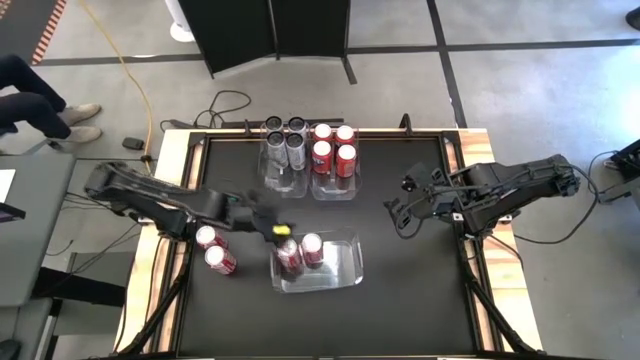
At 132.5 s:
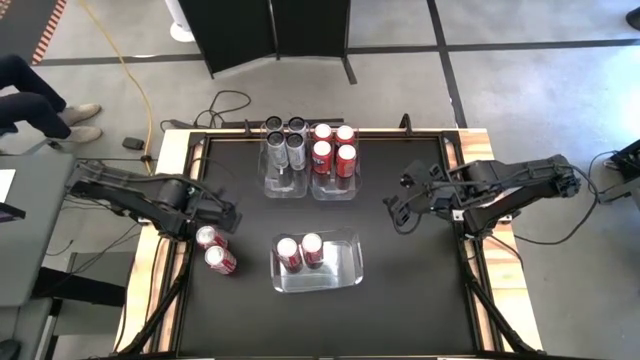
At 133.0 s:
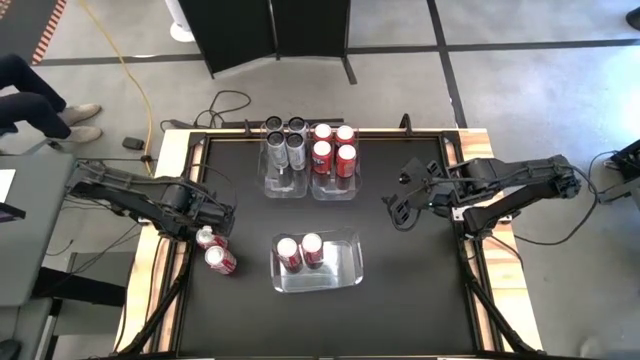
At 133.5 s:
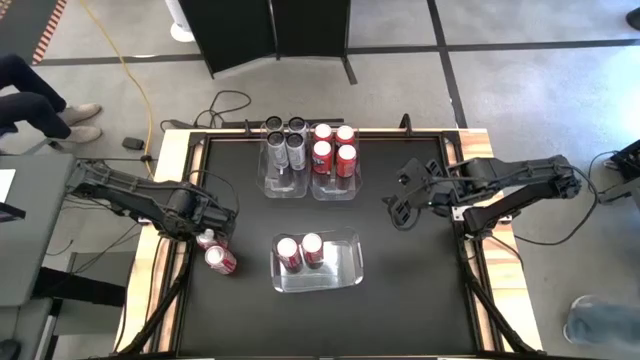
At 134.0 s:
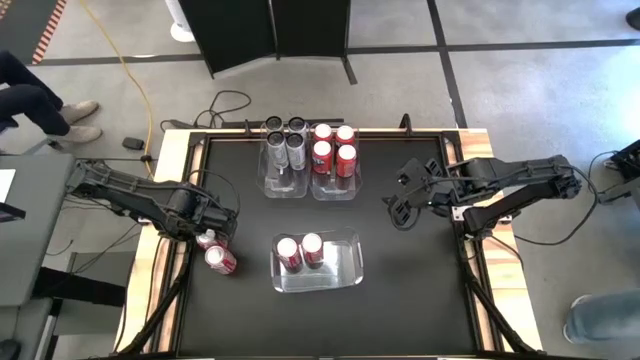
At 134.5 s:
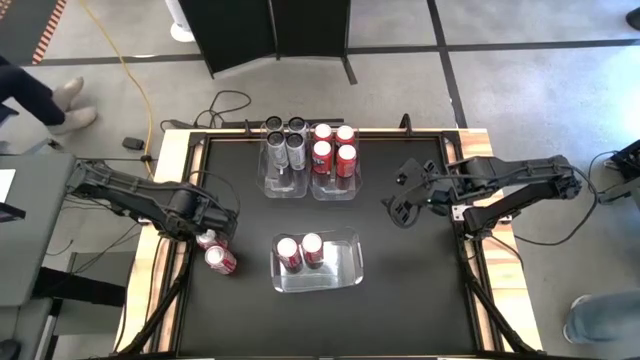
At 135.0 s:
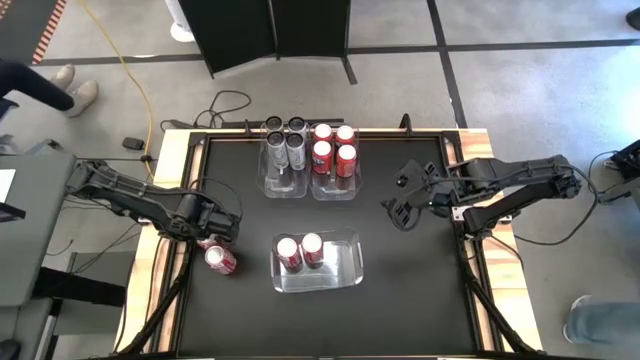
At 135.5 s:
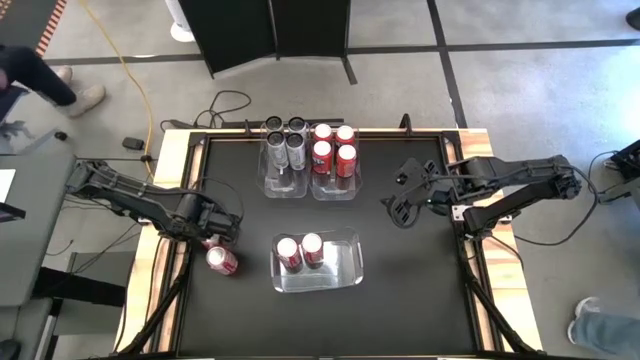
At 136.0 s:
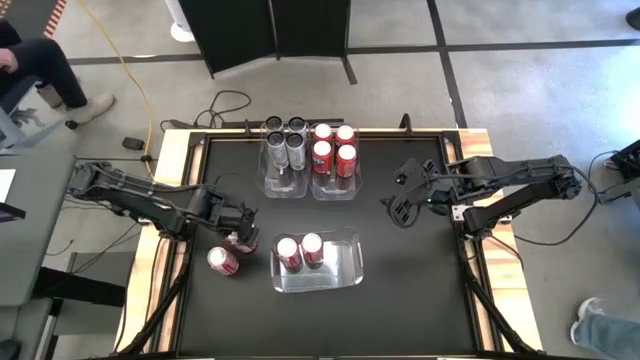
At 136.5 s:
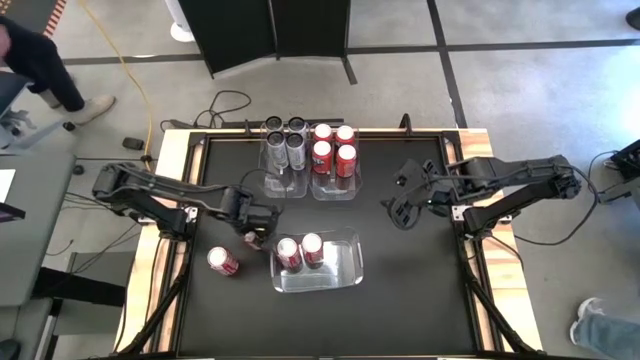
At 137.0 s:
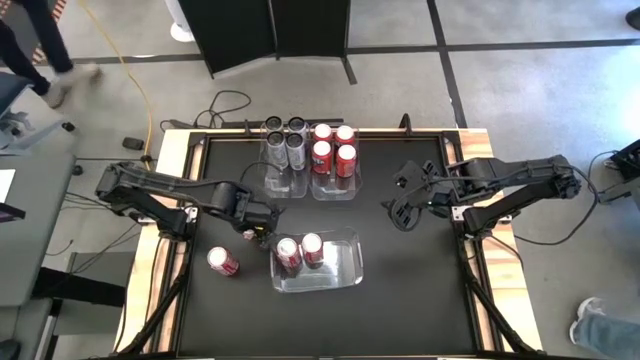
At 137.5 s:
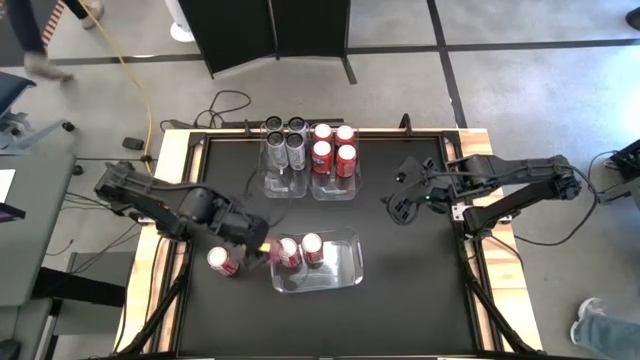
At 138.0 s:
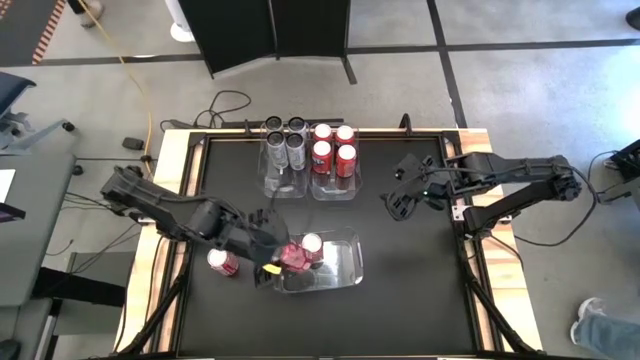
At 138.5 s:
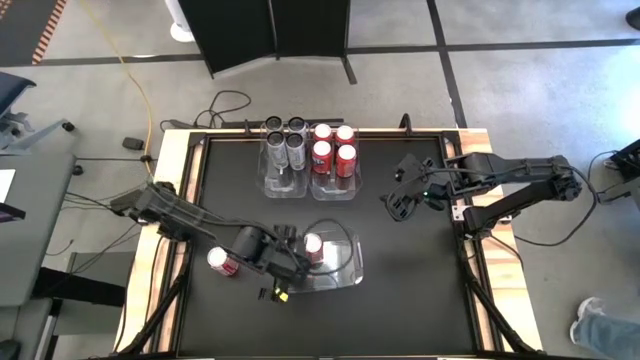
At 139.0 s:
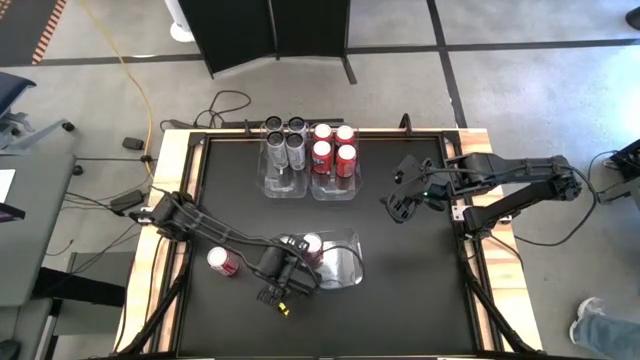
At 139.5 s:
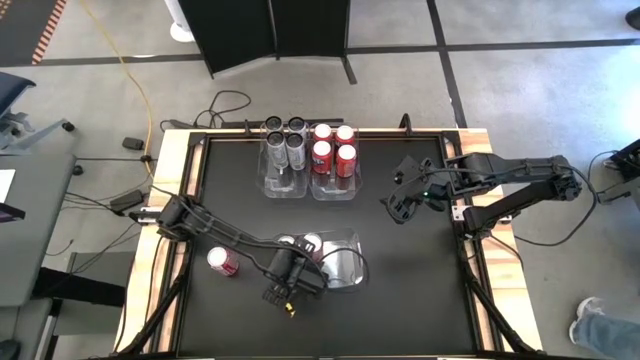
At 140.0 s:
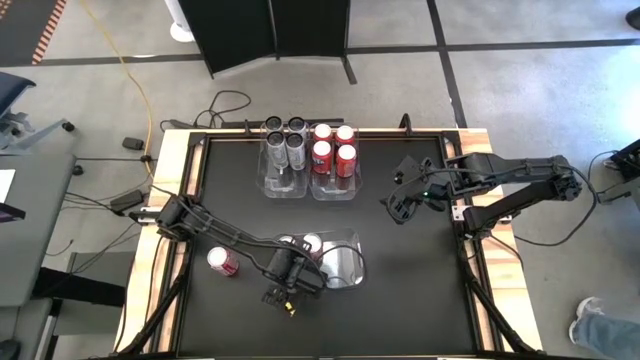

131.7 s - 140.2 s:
Task: Sort soda cans
Put the top red-white soda can into the bottom transparent bin

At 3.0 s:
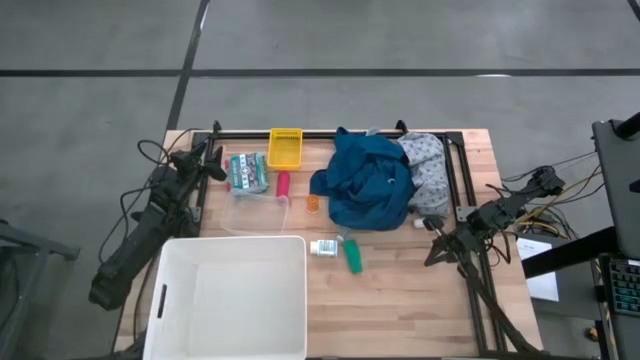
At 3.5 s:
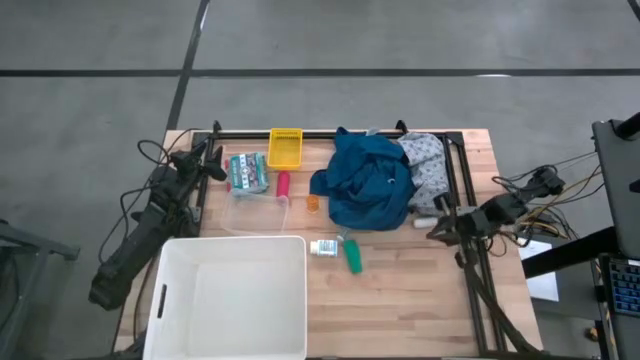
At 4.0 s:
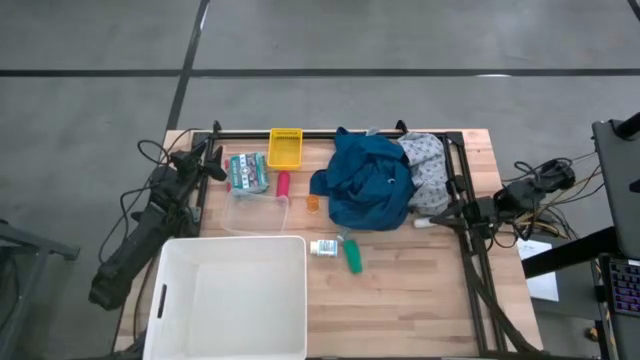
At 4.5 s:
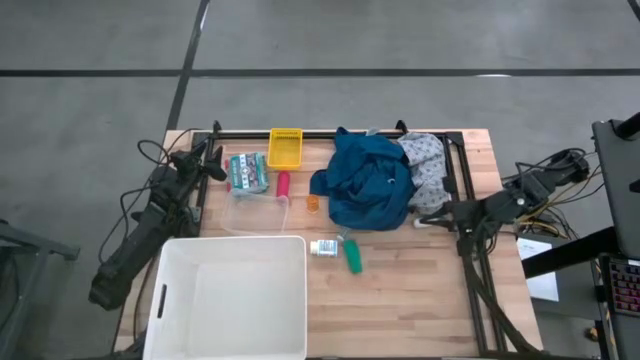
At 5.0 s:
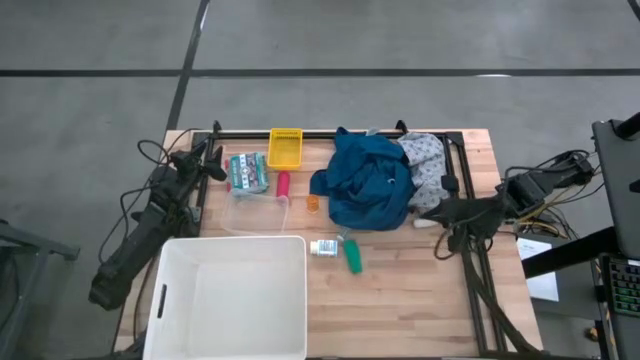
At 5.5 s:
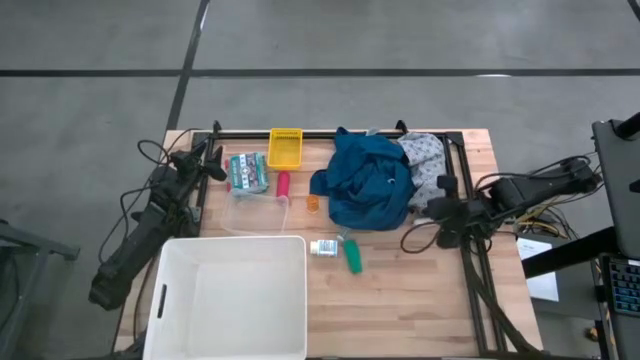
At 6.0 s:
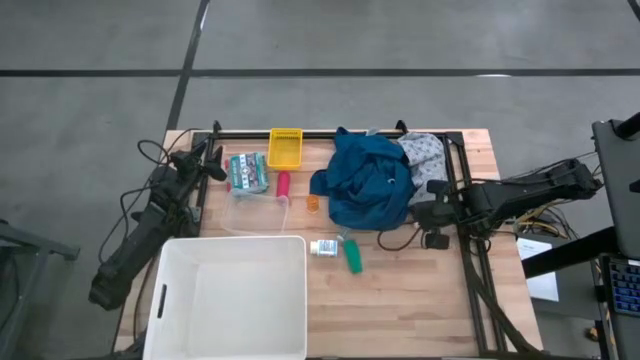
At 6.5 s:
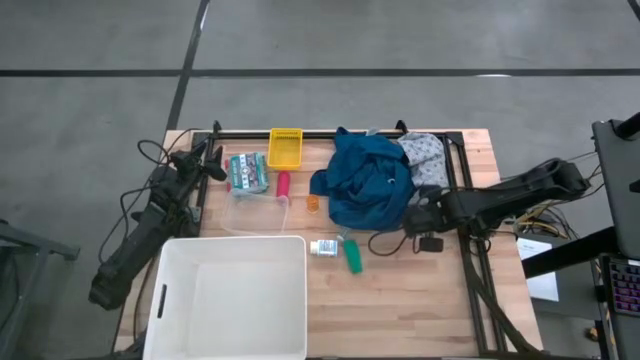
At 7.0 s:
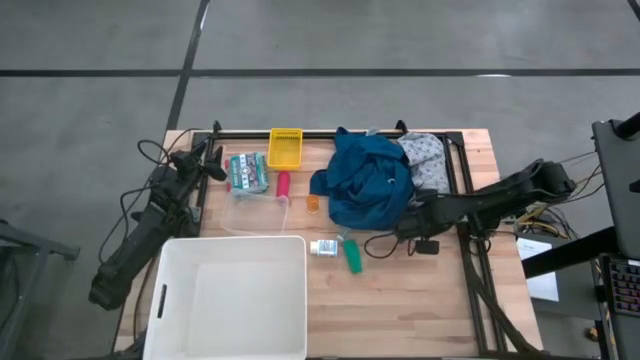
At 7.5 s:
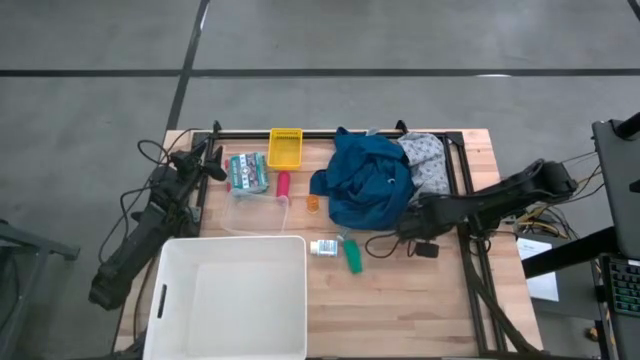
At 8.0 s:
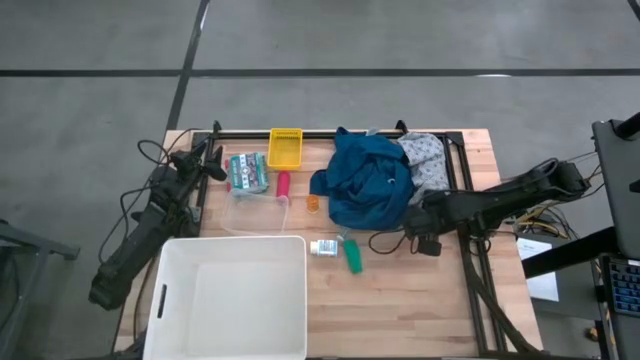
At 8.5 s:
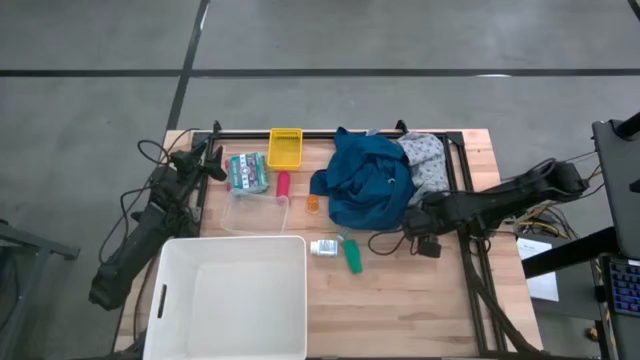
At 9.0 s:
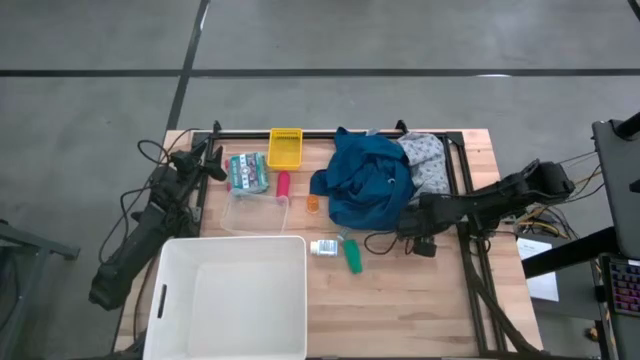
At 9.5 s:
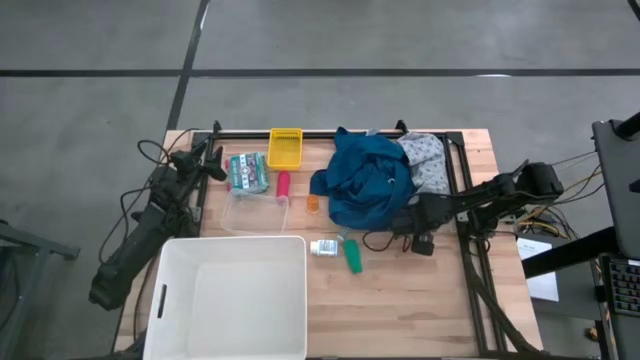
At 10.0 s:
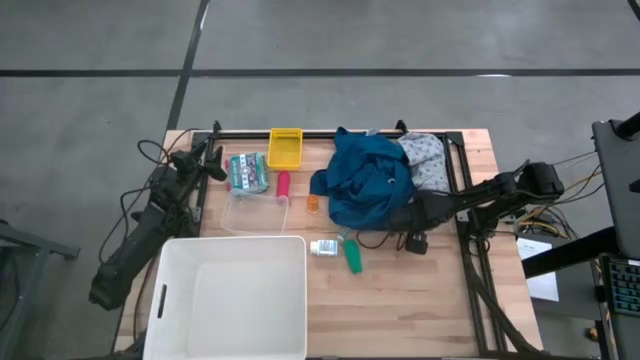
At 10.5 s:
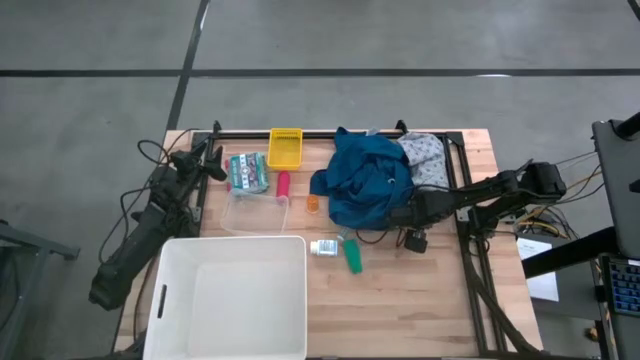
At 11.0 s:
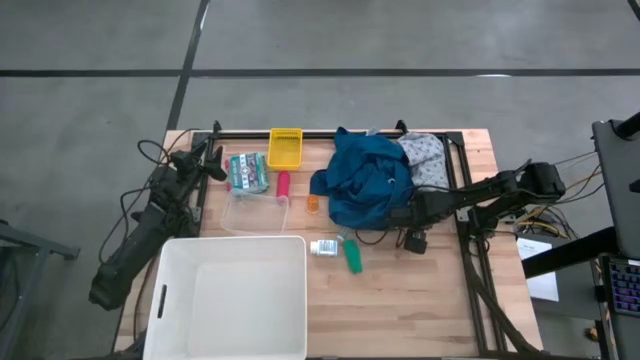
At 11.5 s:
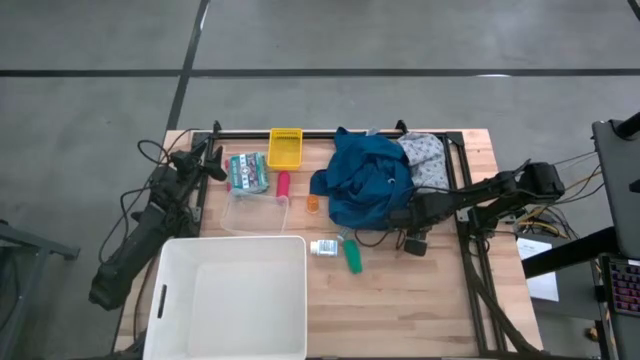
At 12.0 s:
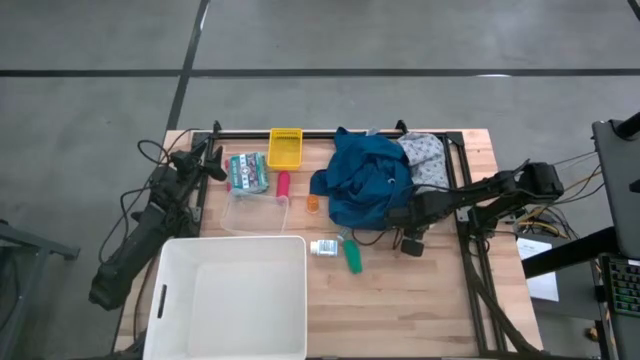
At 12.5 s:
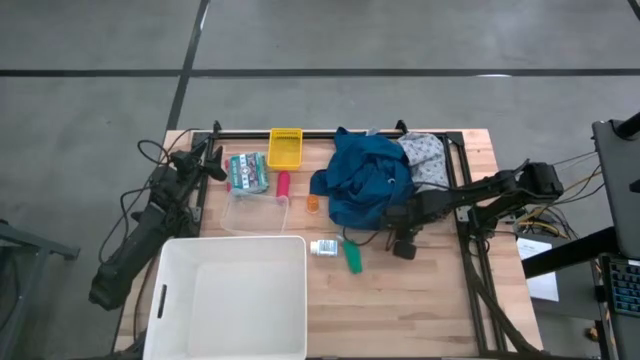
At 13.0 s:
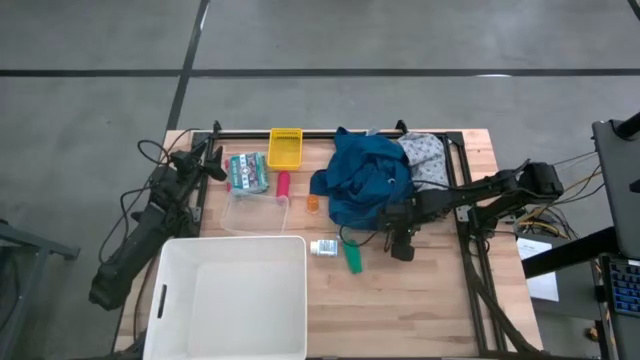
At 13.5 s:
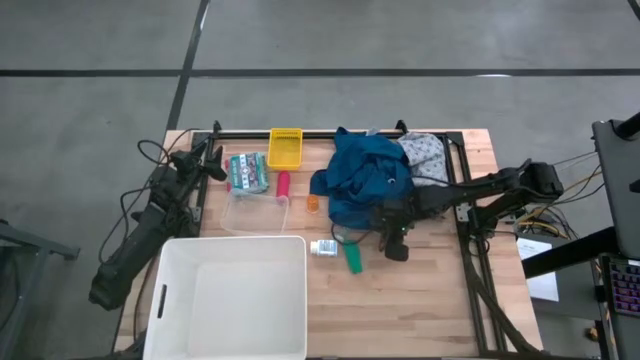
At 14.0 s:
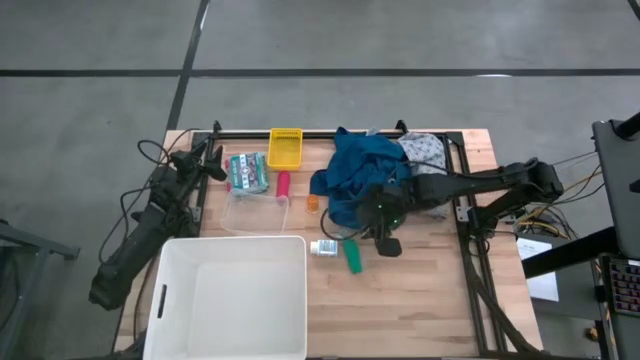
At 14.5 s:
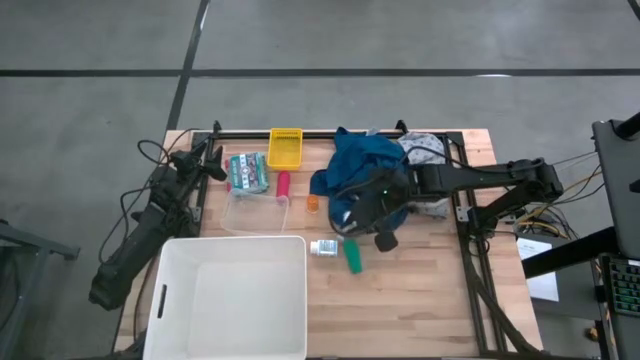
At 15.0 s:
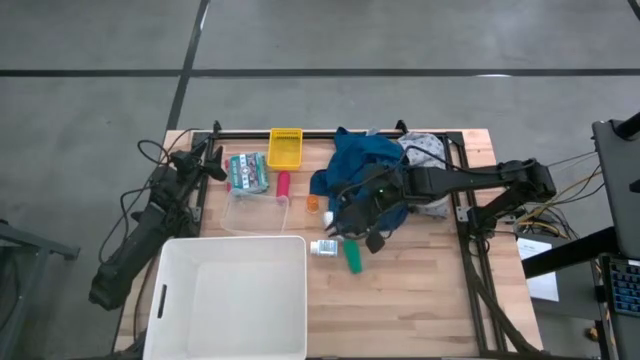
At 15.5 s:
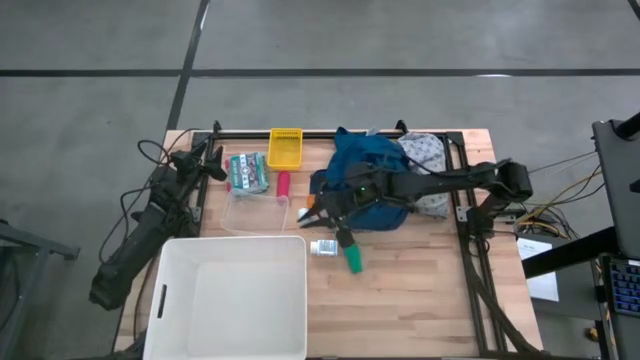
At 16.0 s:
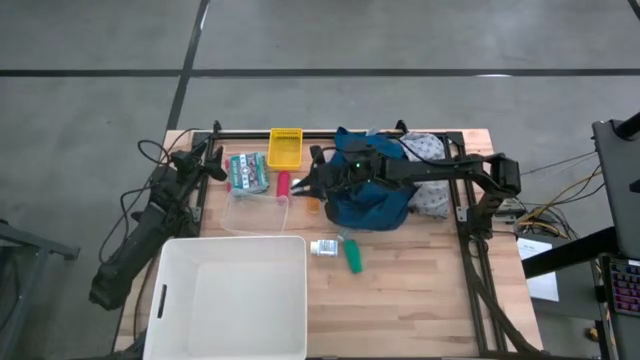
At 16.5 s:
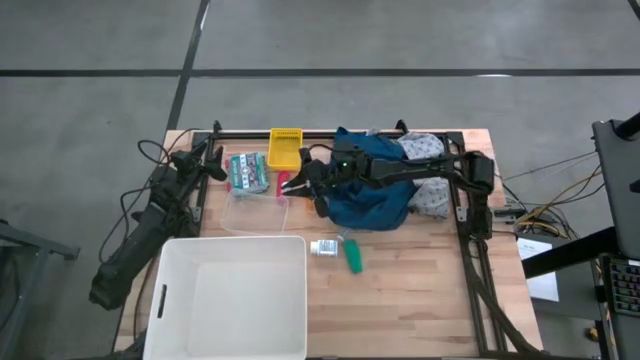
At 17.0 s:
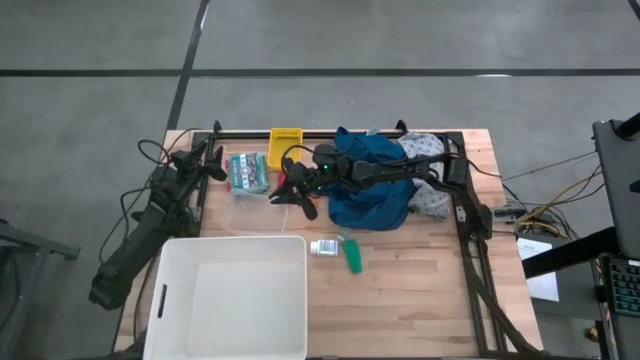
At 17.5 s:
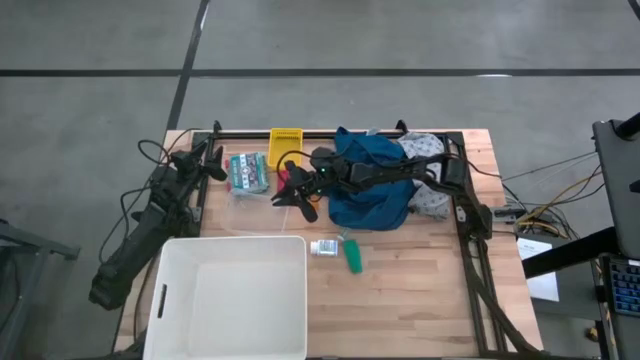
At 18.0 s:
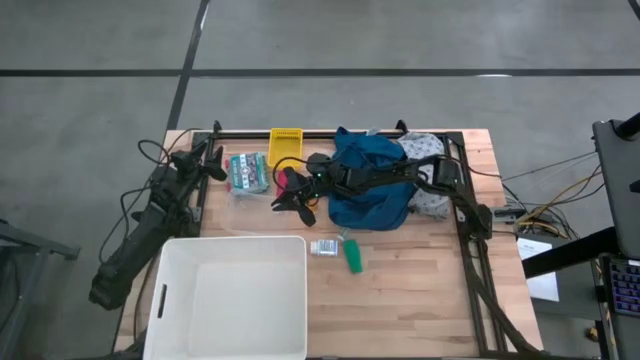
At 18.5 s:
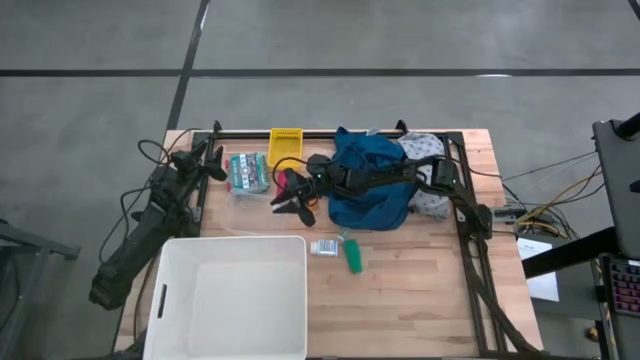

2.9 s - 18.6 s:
Task: Pick & place medical supplies in basket/bin
Put the white bandage into the transparent bin
